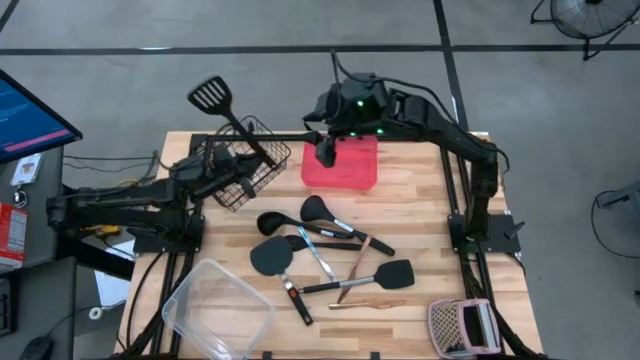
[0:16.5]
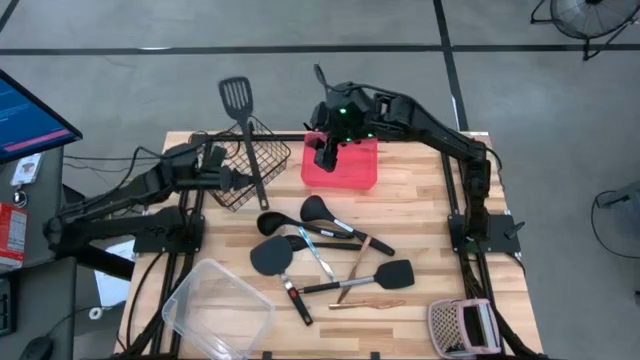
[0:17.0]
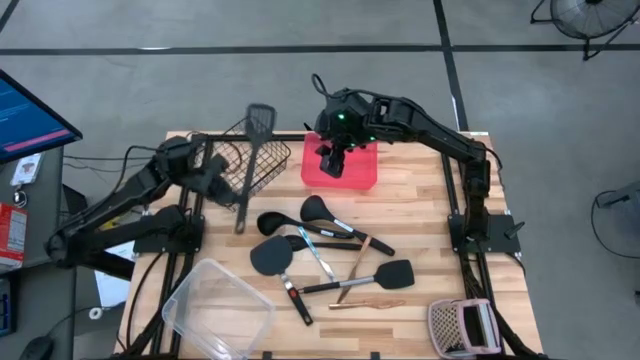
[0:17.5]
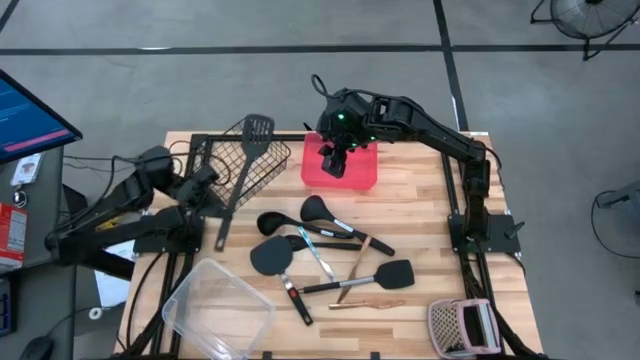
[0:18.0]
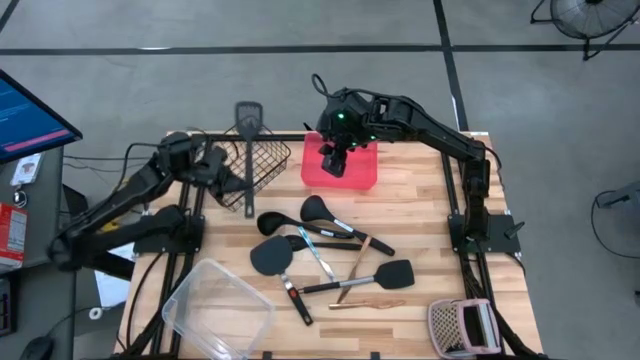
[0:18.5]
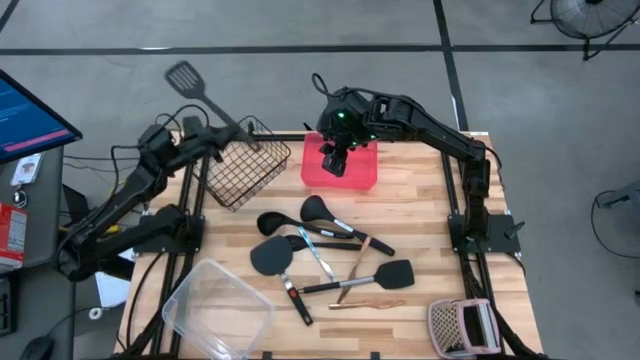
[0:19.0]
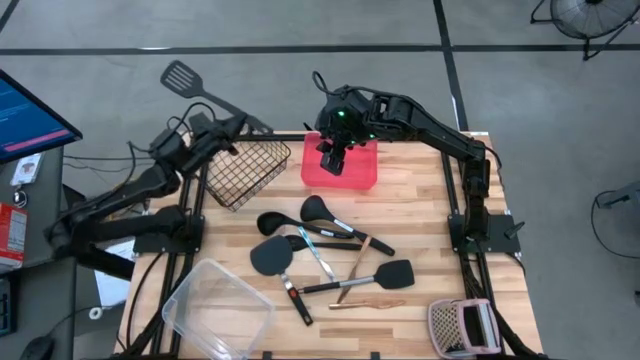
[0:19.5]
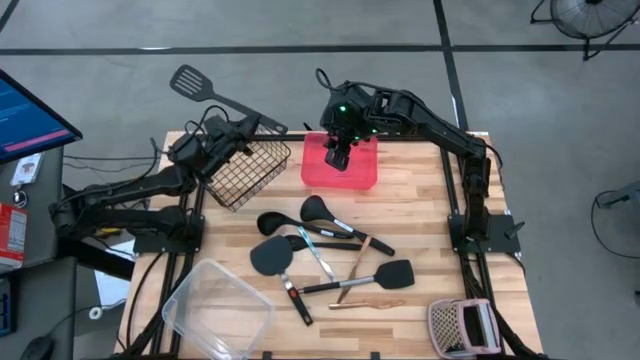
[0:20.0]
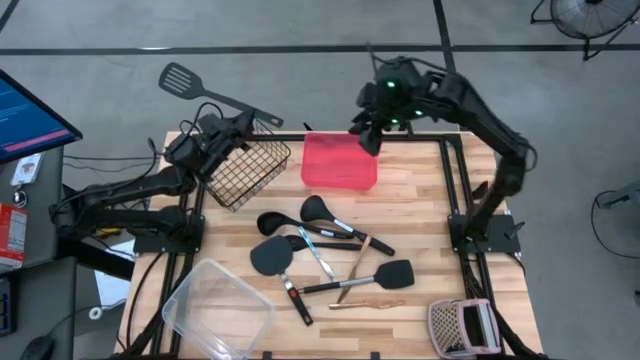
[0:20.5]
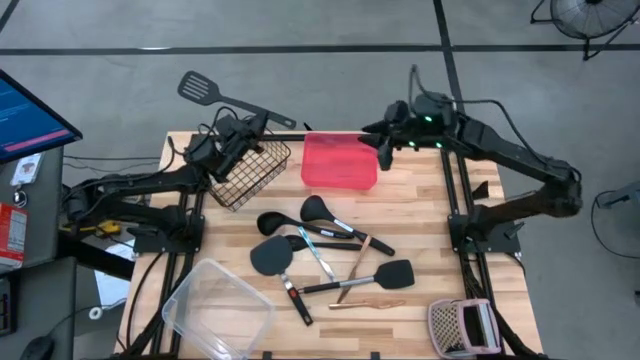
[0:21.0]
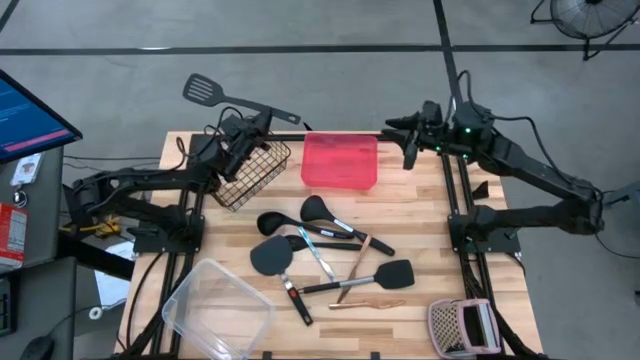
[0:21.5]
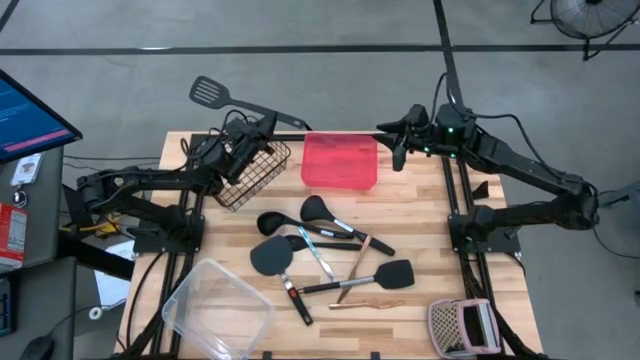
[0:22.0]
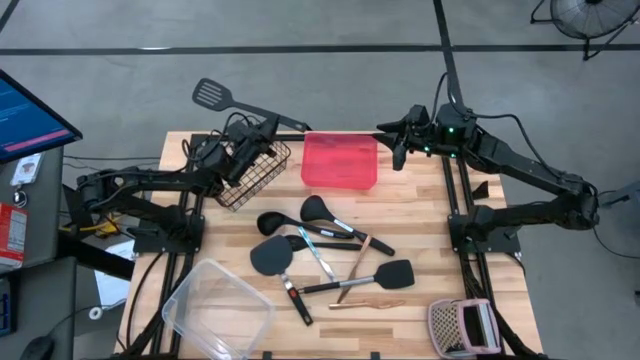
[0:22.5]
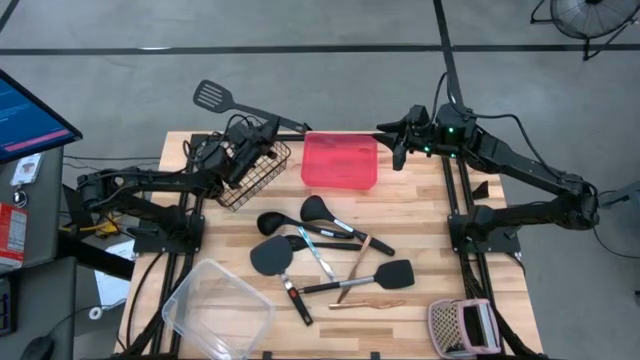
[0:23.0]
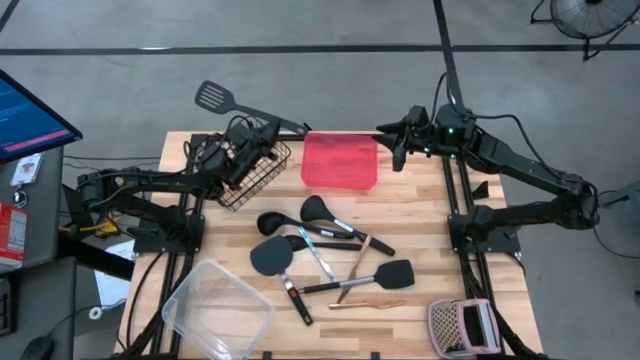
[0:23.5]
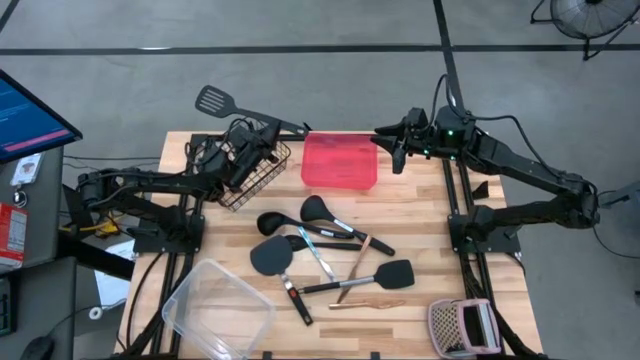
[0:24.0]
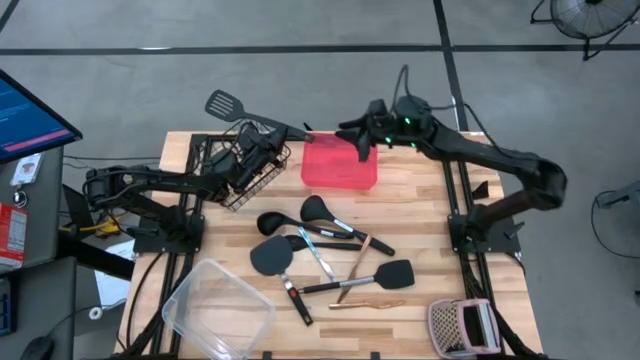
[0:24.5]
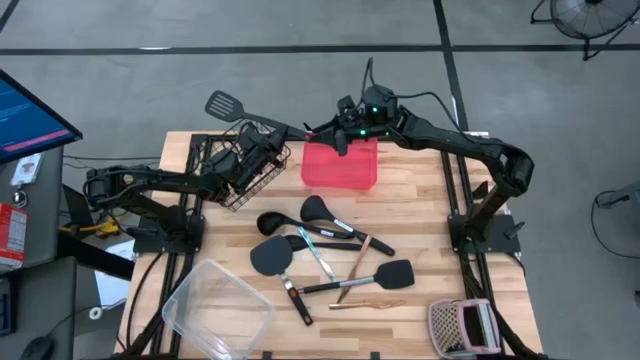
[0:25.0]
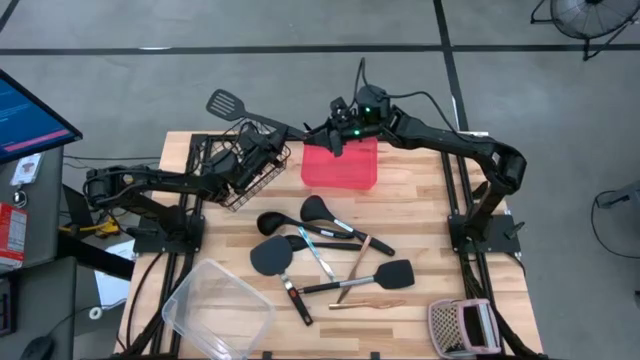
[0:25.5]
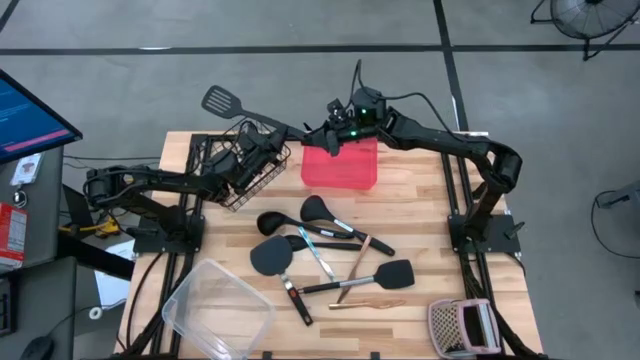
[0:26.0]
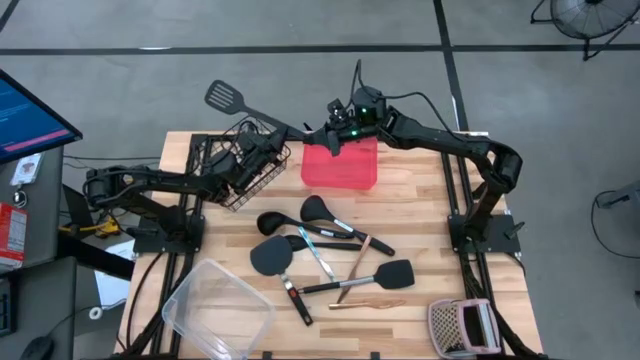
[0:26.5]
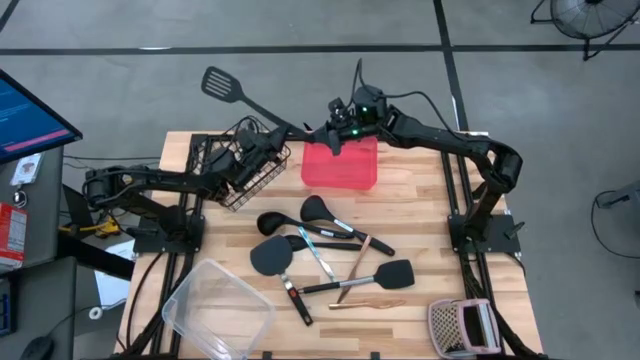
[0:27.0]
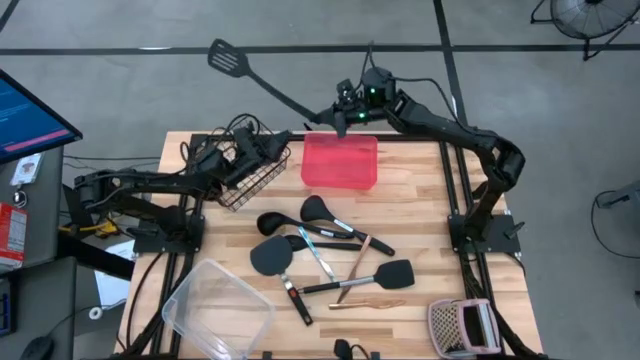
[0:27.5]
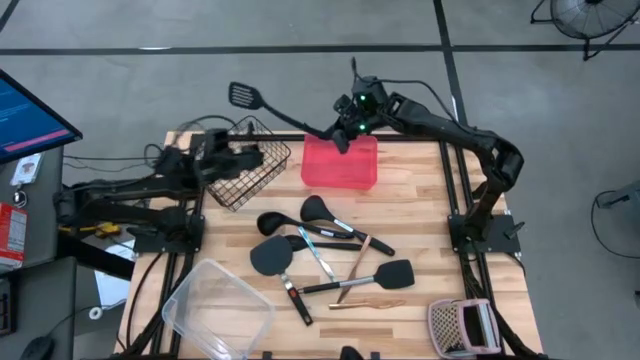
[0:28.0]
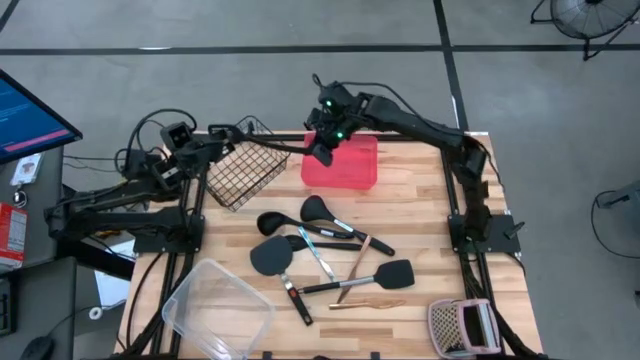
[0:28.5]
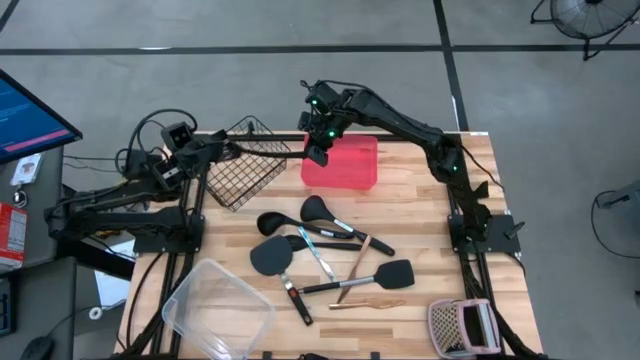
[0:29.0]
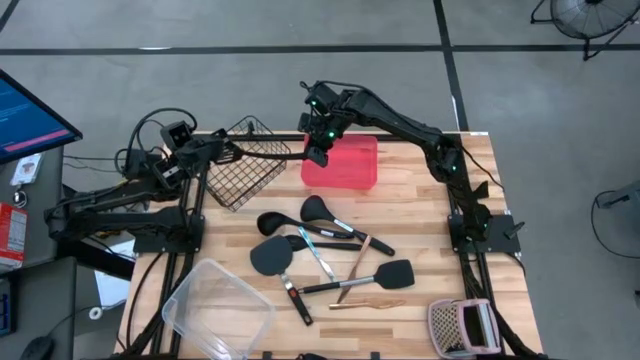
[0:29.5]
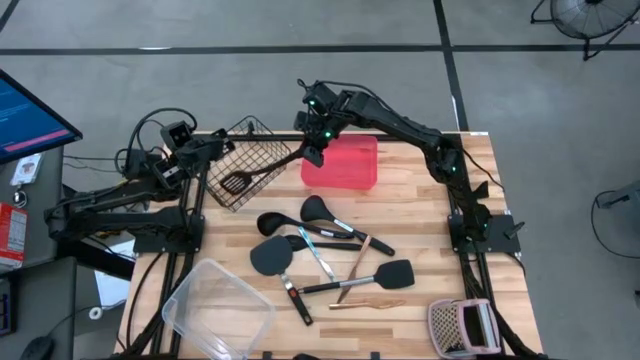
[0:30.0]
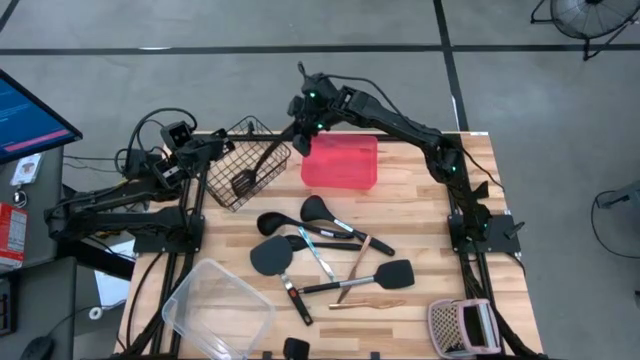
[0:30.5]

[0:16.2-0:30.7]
Task: Pick & Place Kitchen Items
Put the slotted spatula into the wire basket

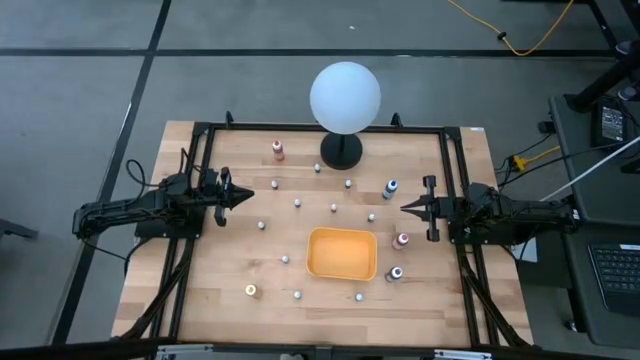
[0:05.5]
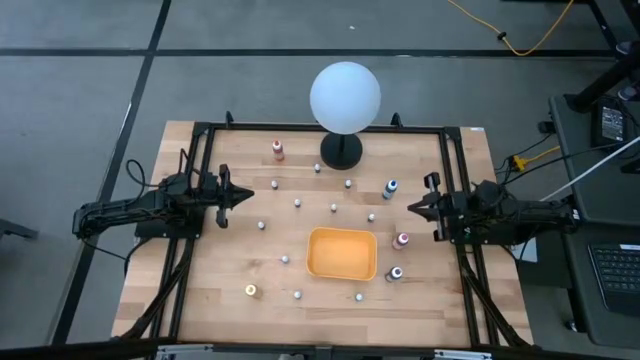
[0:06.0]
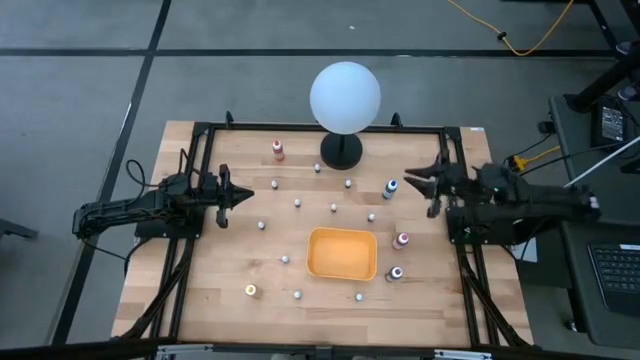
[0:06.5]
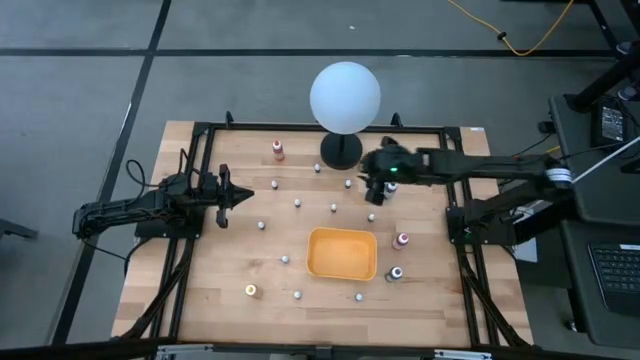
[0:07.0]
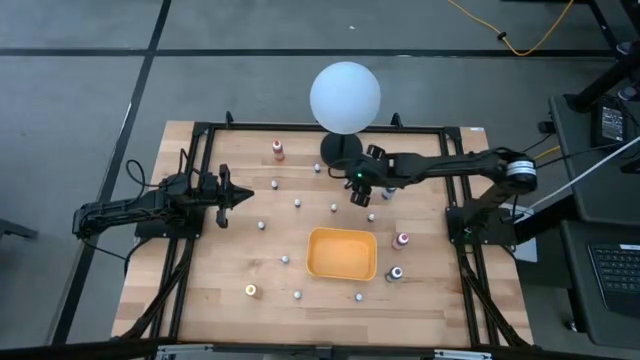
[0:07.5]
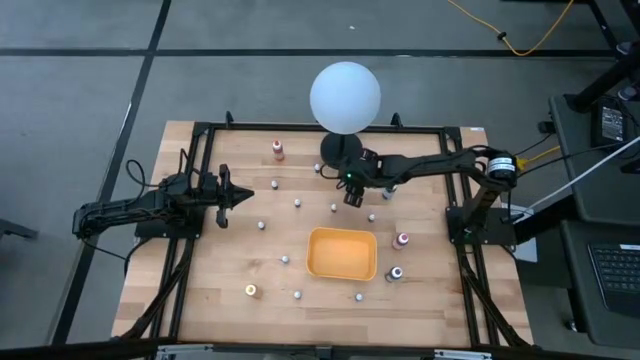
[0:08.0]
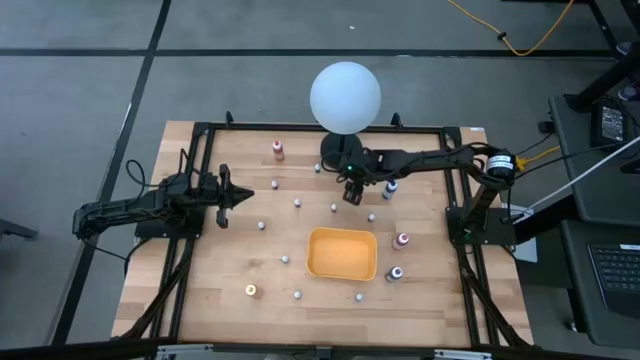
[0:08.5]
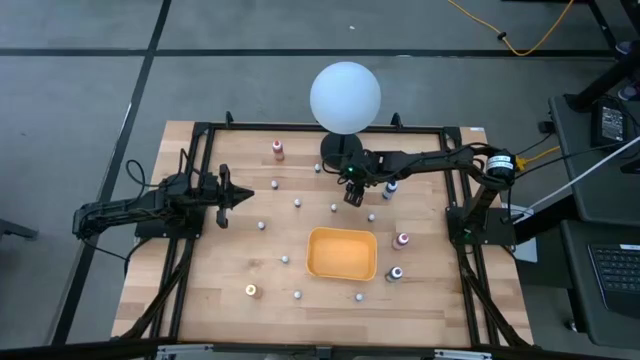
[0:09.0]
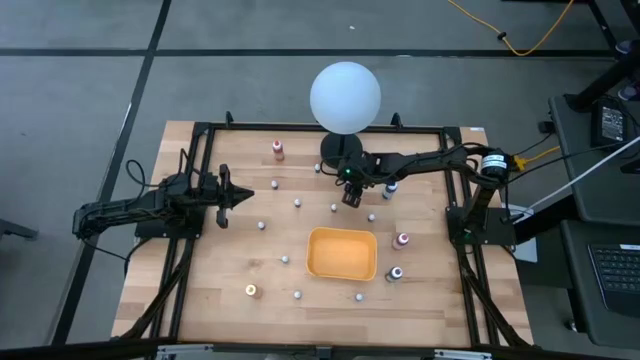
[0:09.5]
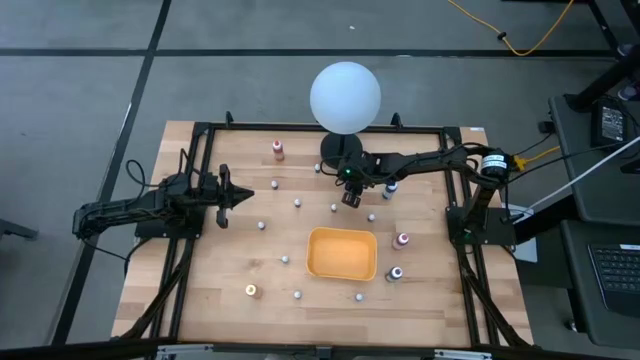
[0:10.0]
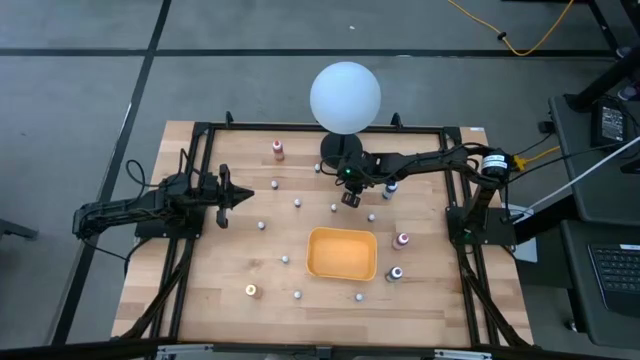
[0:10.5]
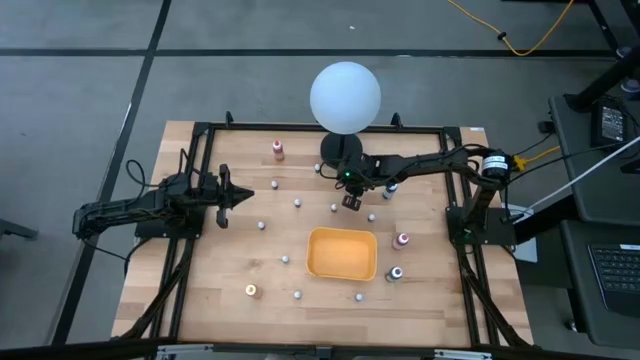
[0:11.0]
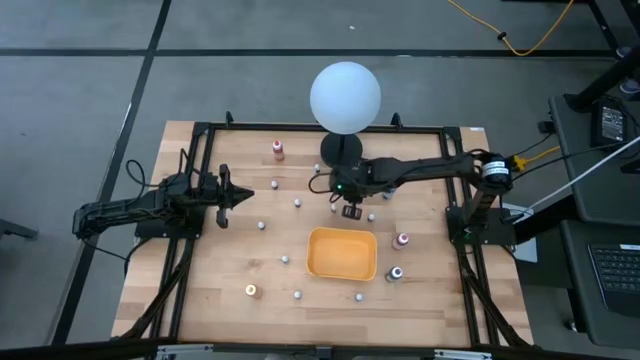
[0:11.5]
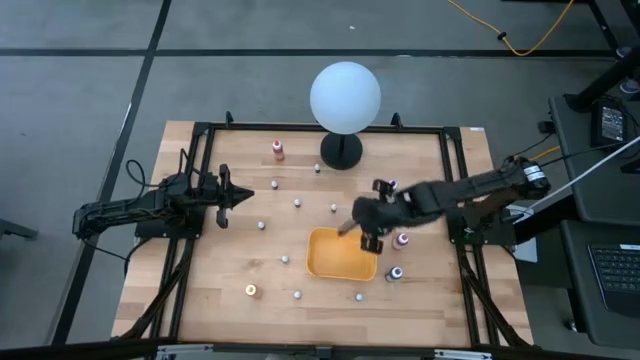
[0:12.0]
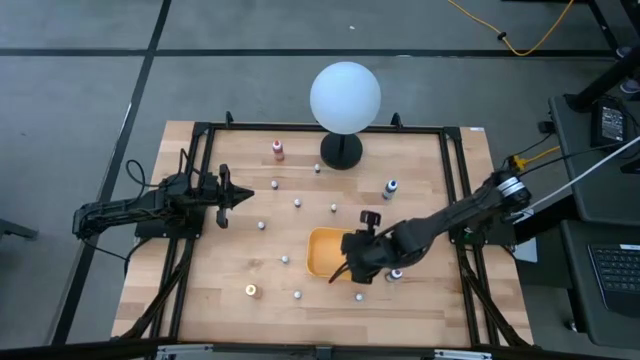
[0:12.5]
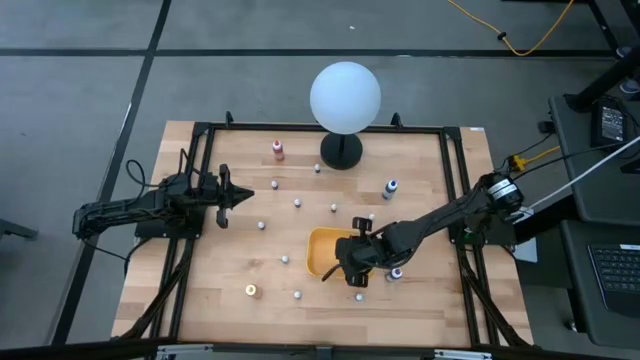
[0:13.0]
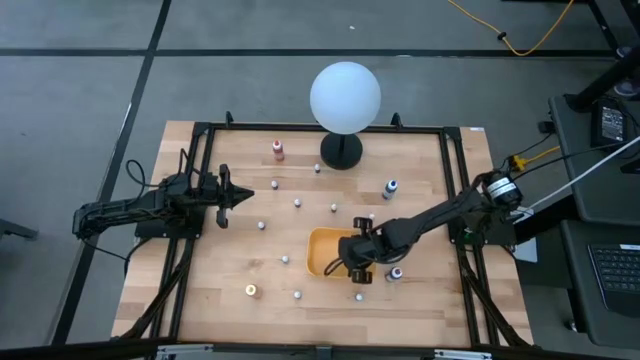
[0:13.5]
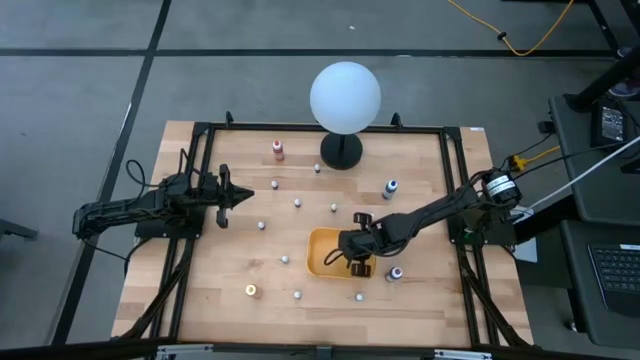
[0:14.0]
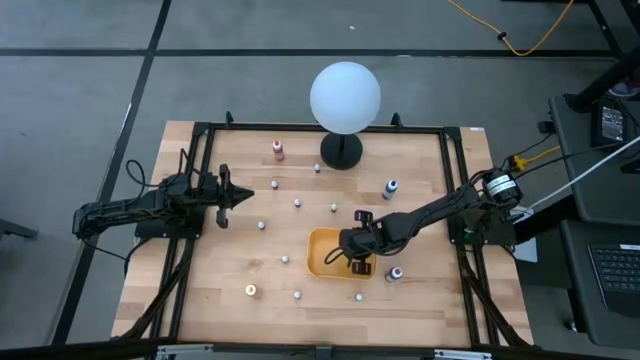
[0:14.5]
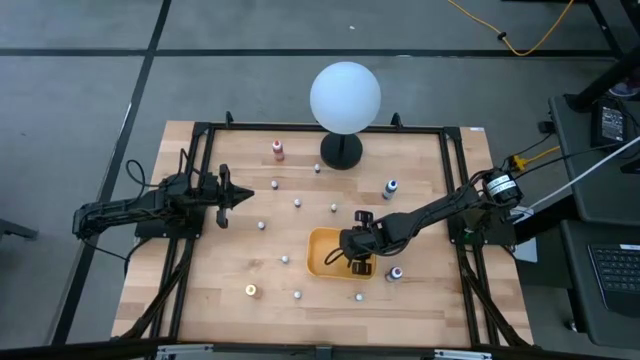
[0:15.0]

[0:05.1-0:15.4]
Task: Pick & Place food coloring
Put the small black food coloring bottle into the yellow bin
